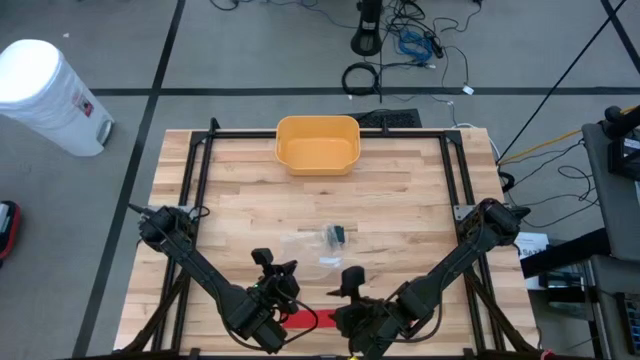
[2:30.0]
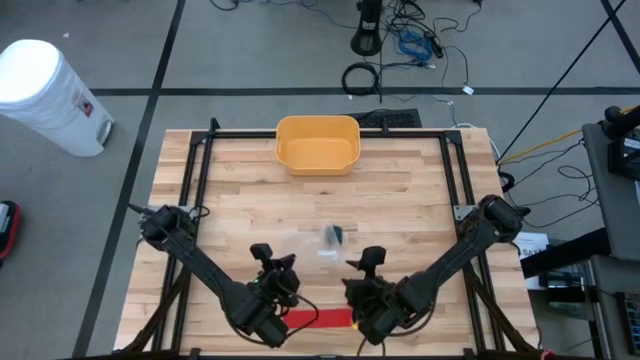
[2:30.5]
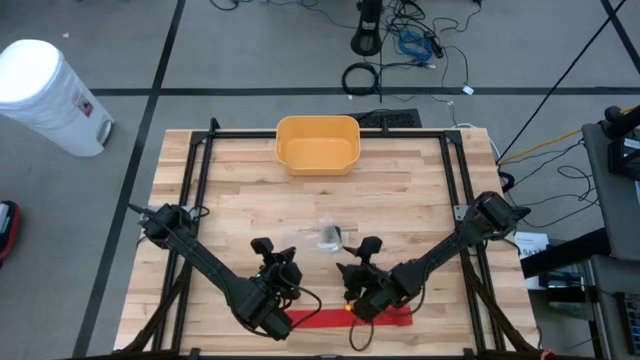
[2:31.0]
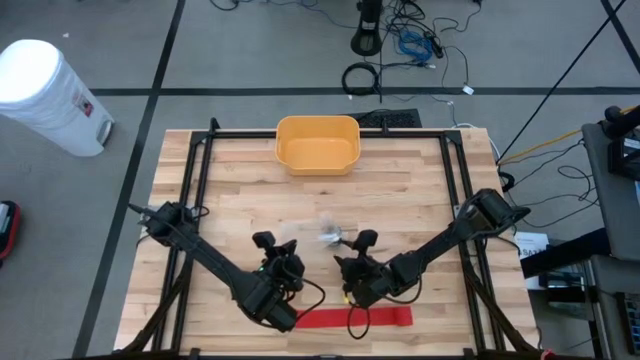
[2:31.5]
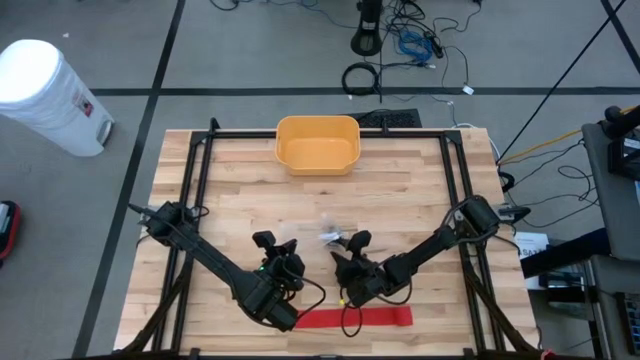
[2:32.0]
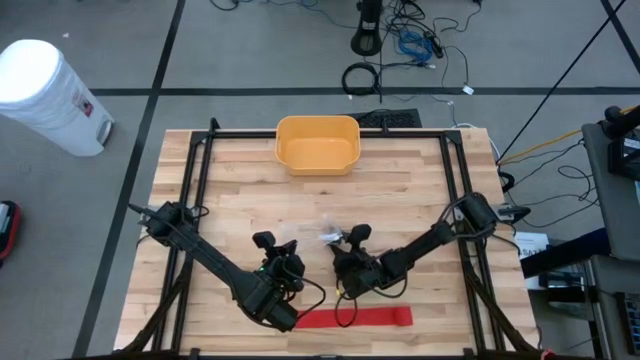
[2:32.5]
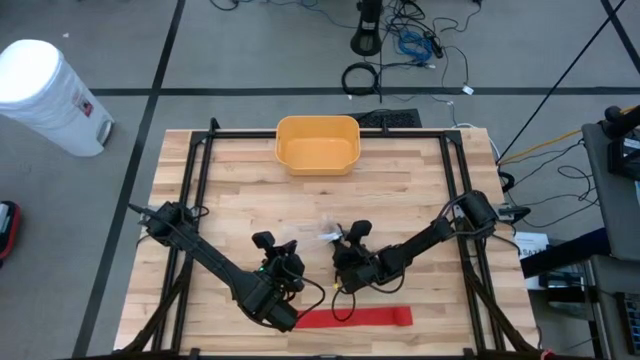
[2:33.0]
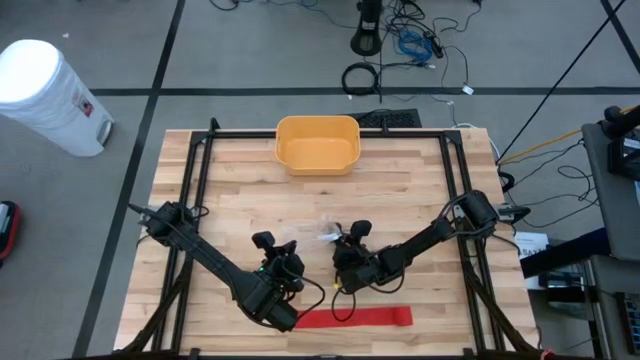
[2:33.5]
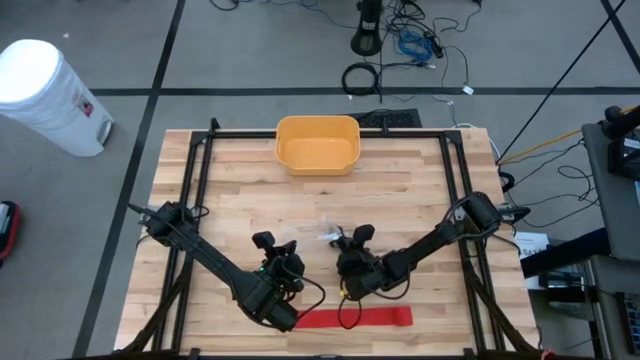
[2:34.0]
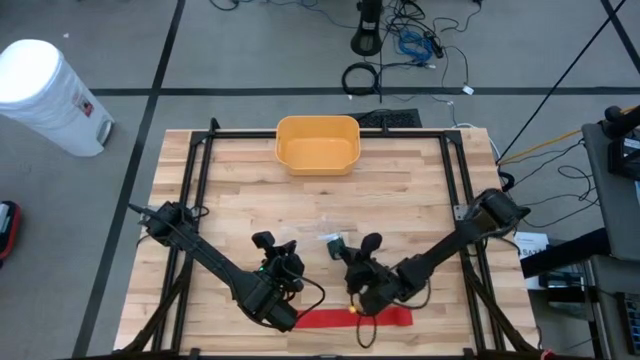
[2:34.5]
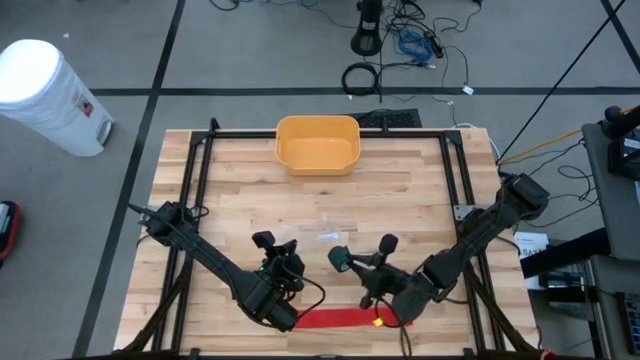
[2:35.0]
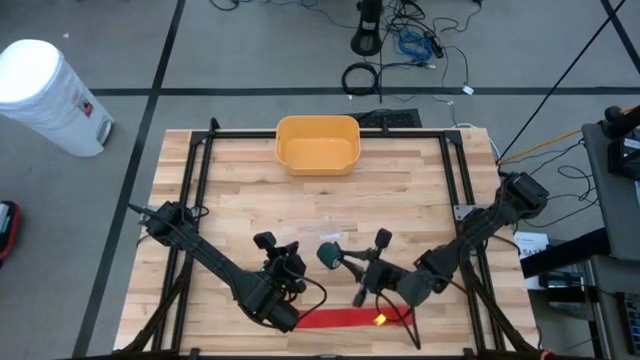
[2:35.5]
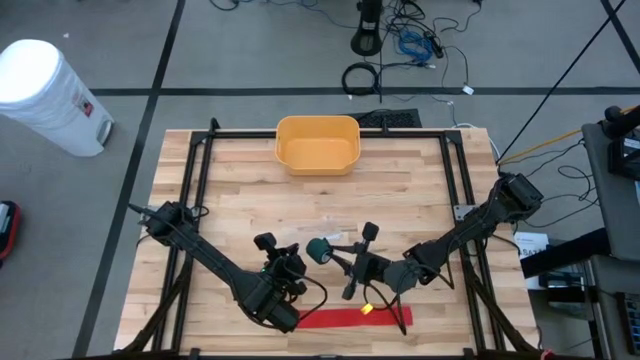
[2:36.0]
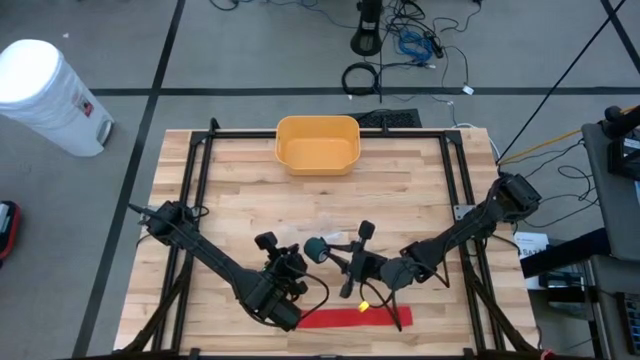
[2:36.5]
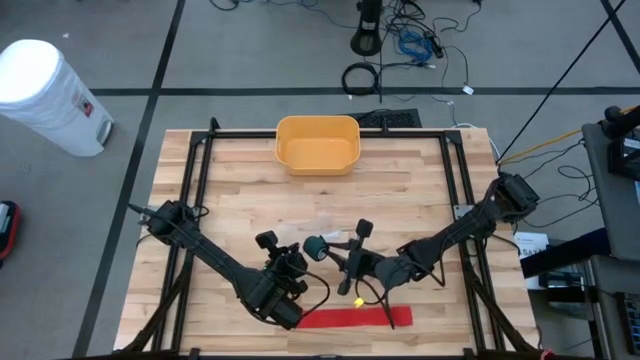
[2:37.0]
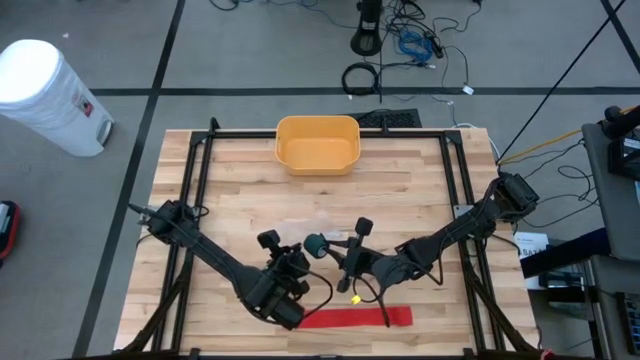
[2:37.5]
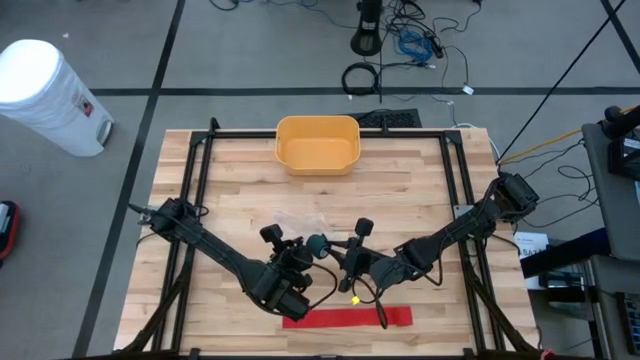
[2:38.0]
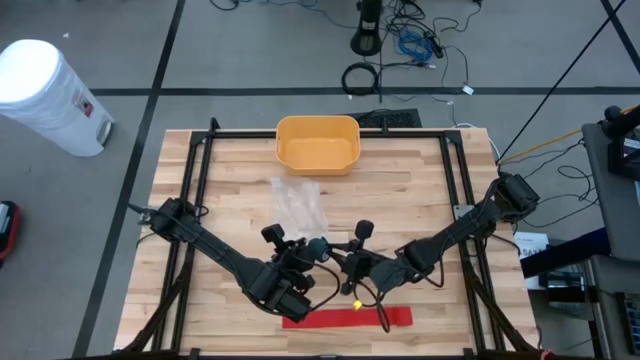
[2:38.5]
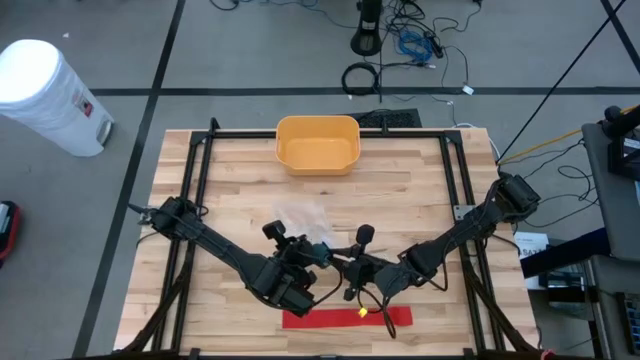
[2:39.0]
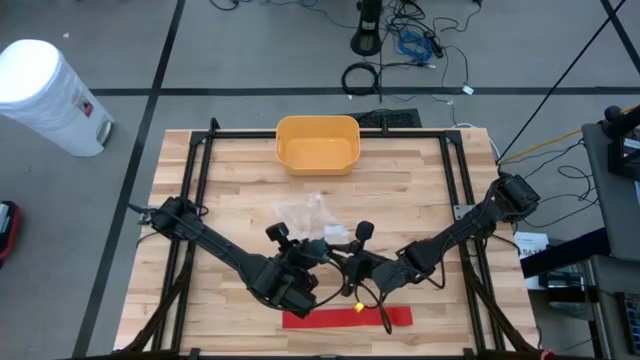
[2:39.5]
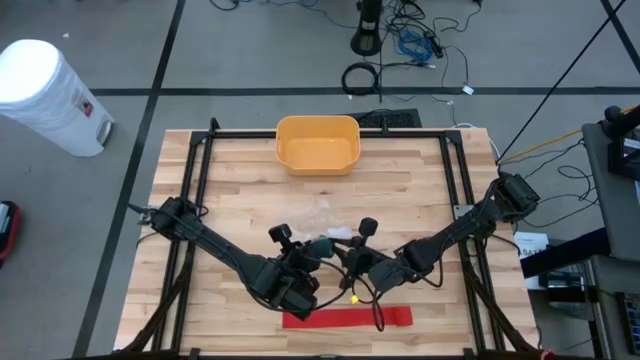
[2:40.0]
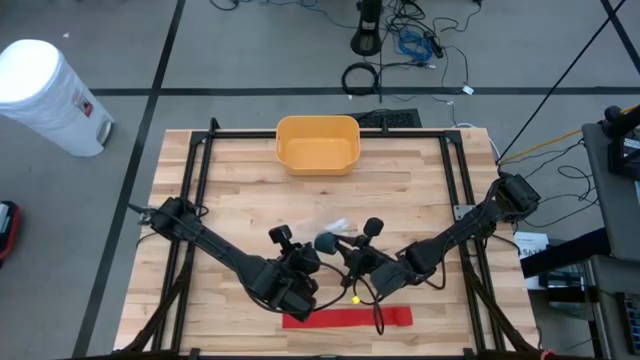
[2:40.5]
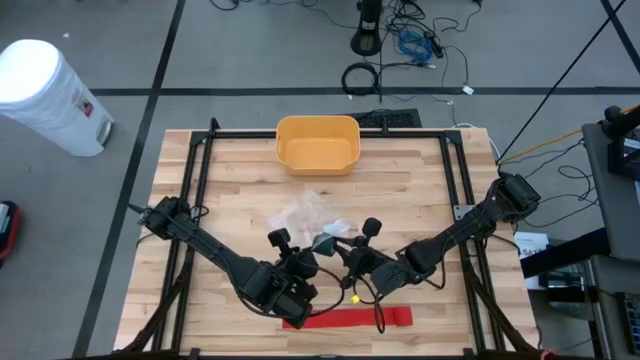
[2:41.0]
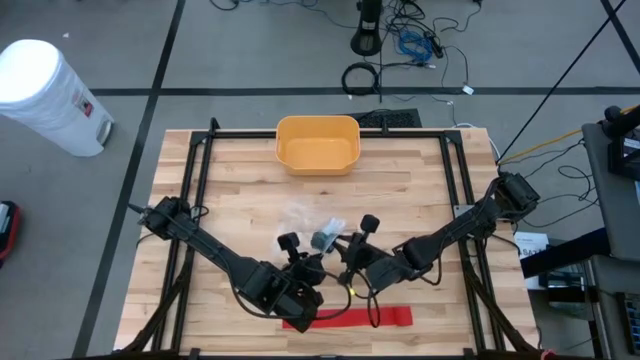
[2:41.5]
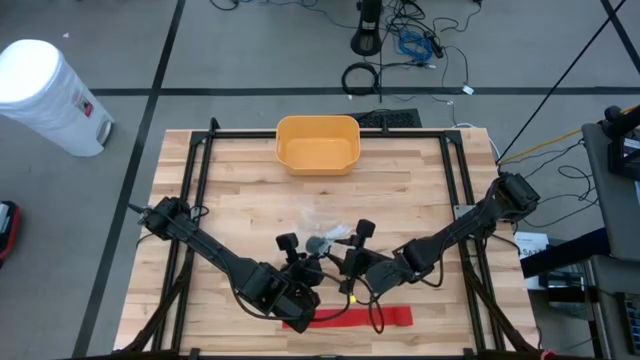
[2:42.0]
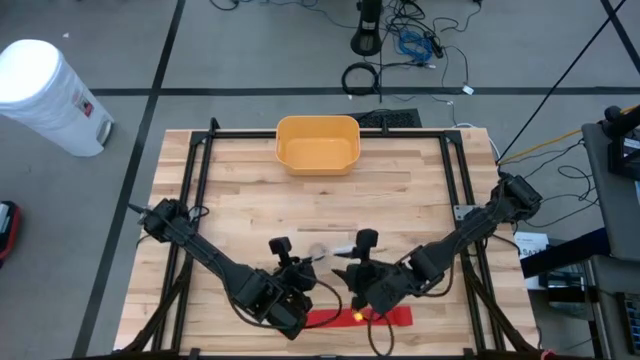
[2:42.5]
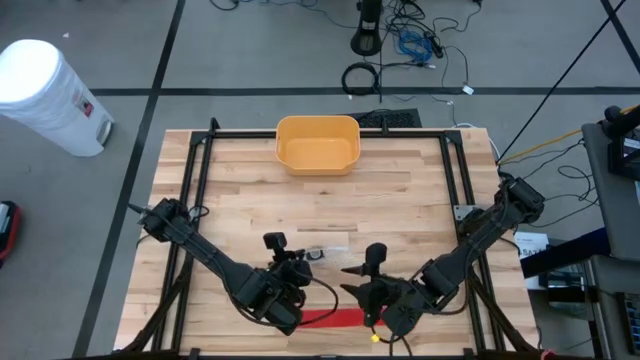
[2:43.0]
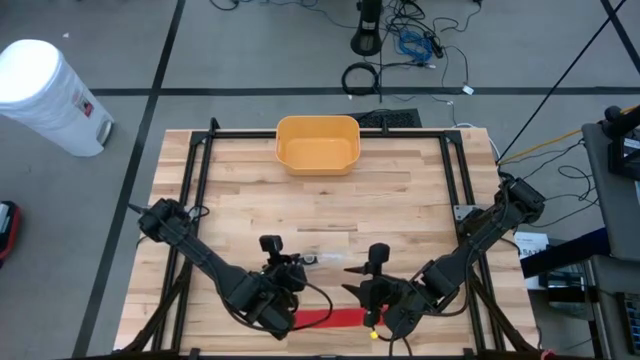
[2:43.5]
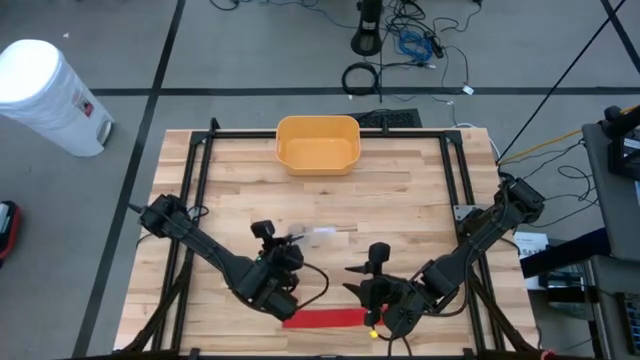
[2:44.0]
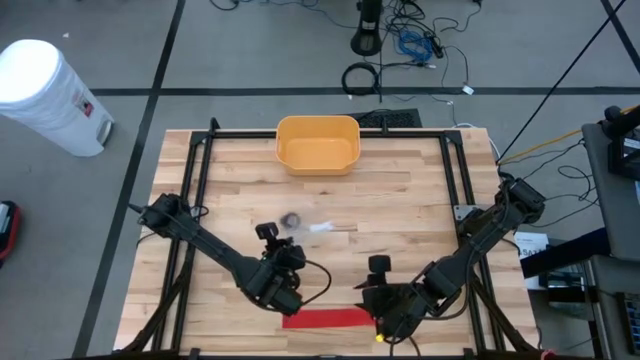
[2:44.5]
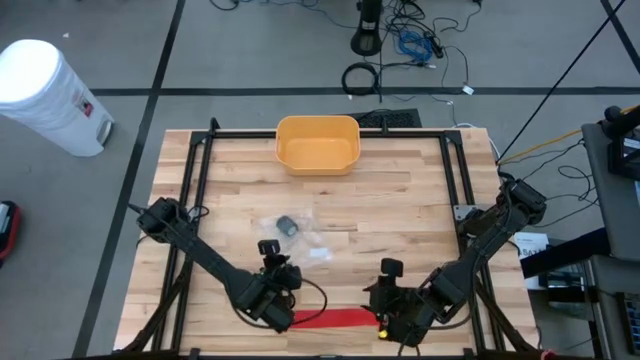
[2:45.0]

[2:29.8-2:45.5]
Task: Roll bandage
Put the green bandage into the transparent zip bag

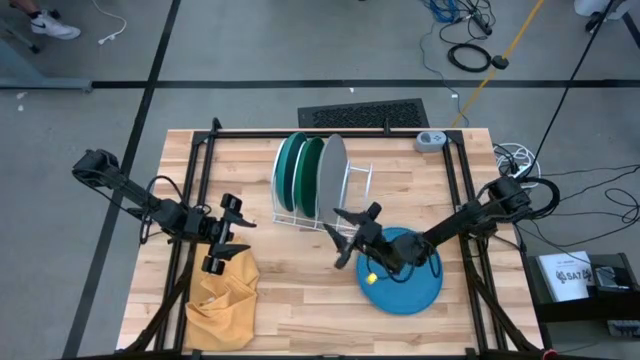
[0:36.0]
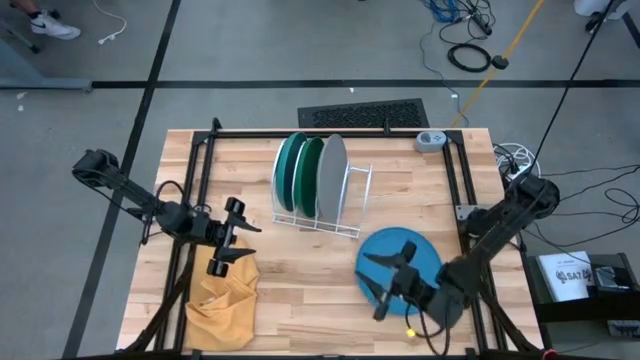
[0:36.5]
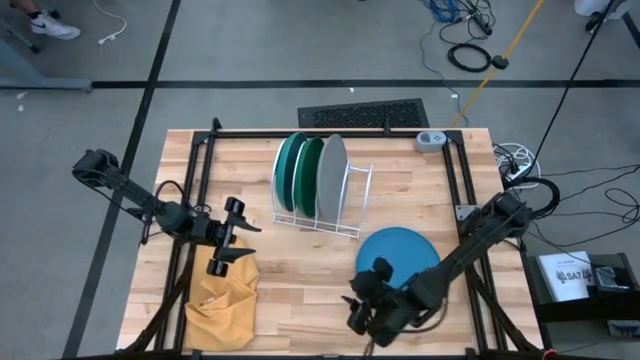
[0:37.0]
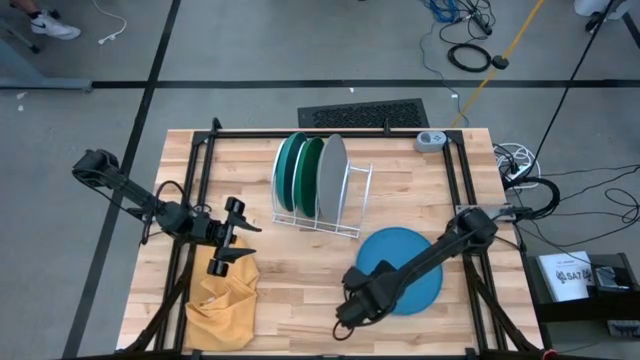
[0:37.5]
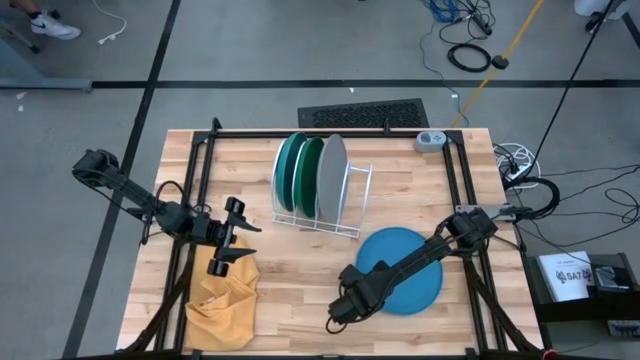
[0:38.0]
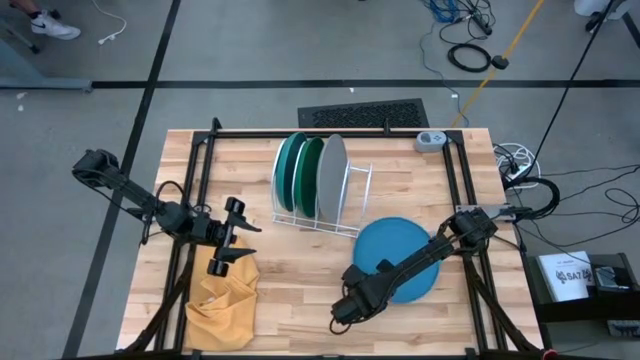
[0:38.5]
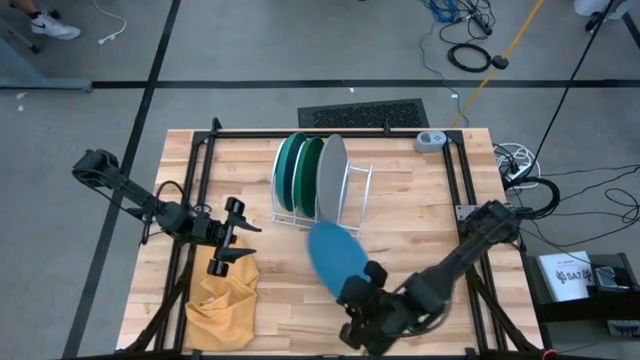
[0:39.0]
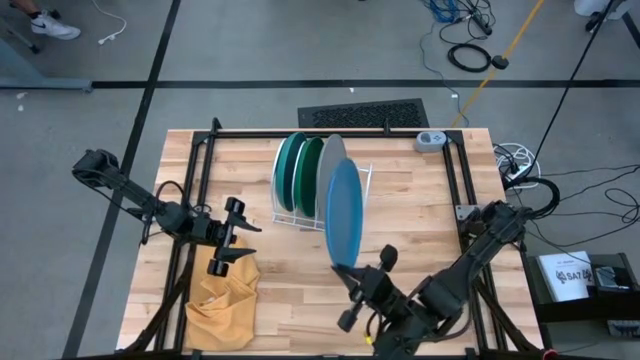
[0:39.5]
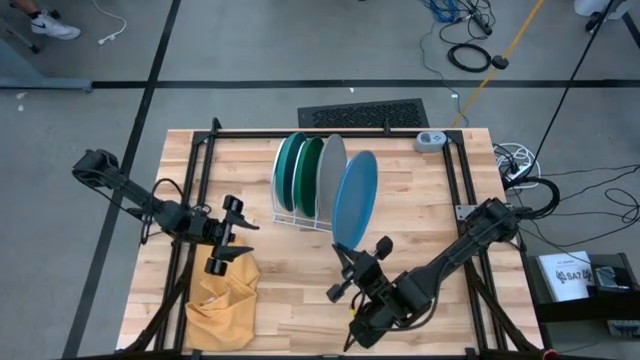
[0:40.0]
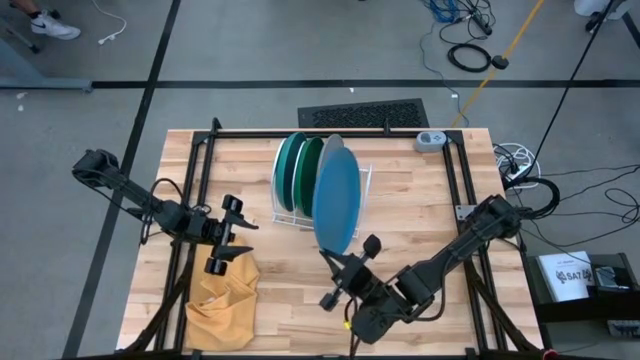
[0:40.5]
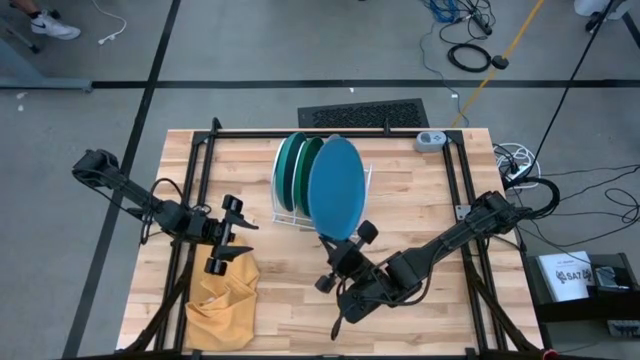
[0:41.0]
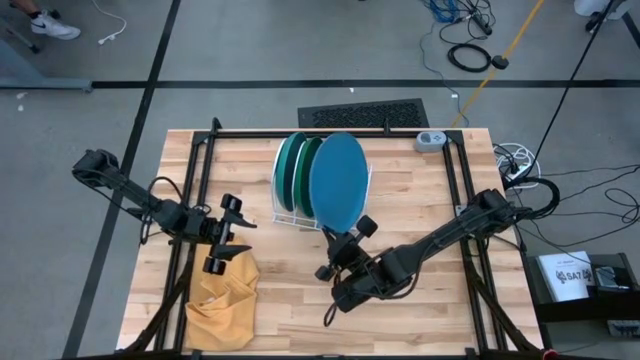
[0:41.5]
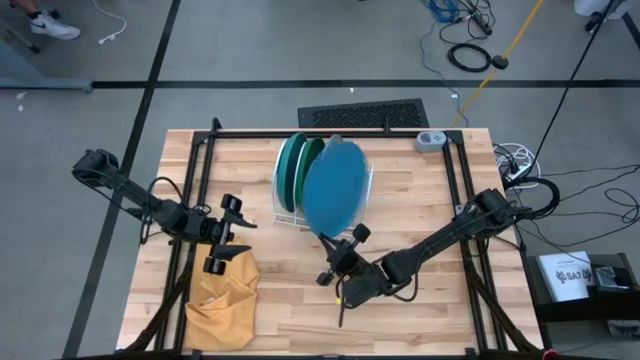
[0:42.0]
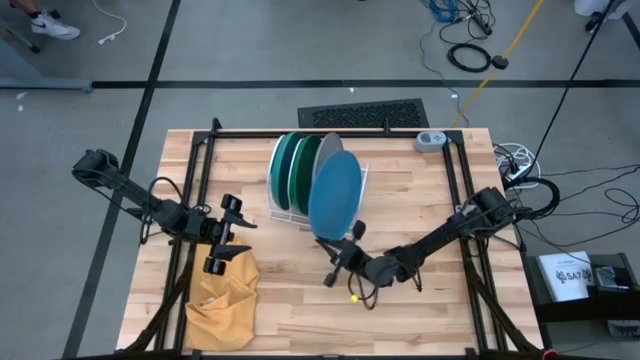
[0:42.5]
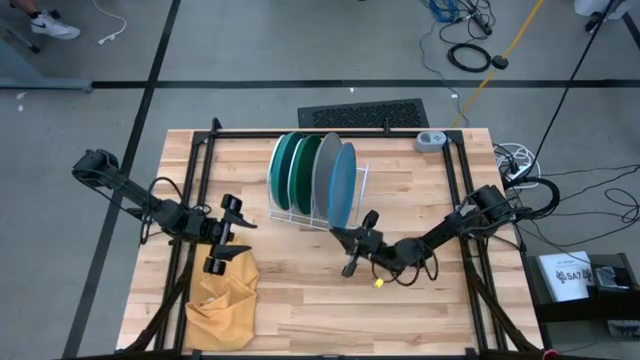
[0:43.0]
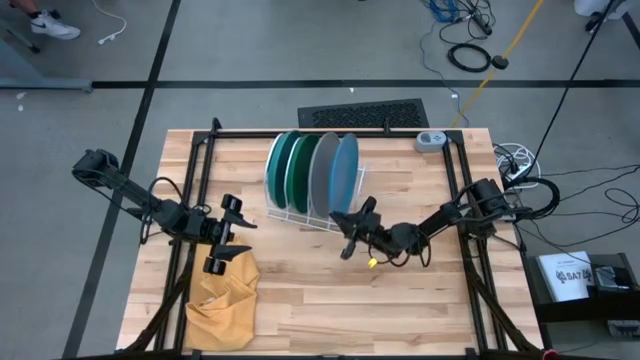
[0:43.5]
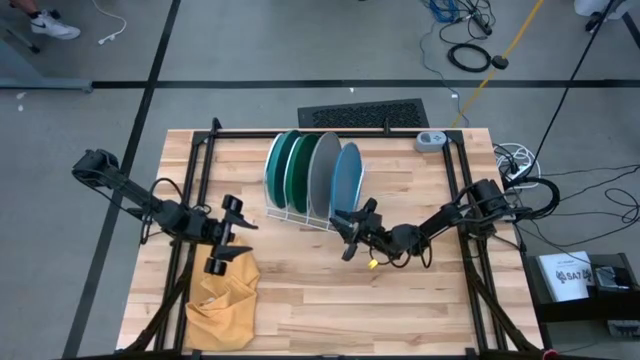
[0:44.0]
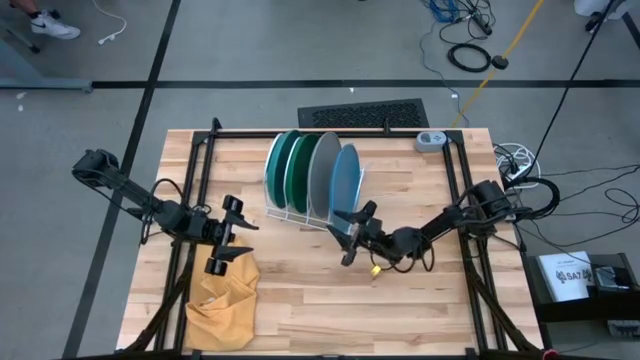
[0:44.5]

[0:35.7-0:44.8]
Task: Sort dishes
Put the blue plate in the white dish rack
